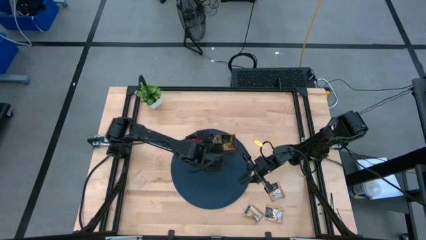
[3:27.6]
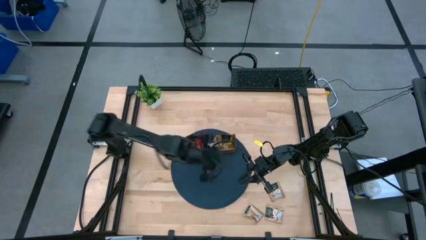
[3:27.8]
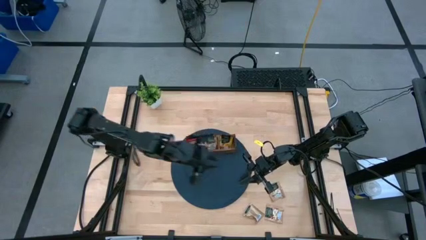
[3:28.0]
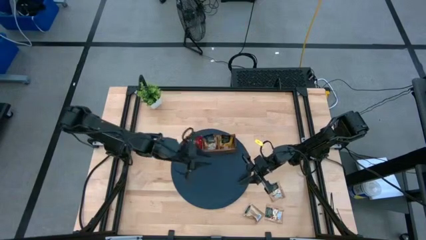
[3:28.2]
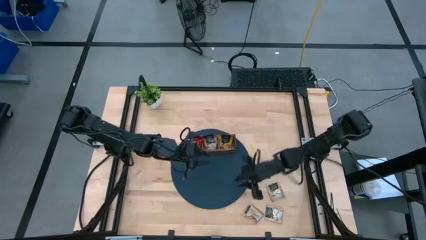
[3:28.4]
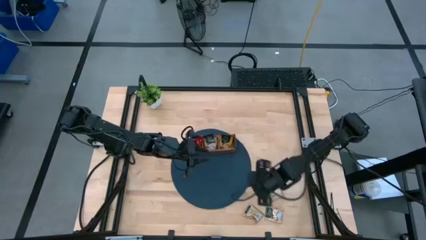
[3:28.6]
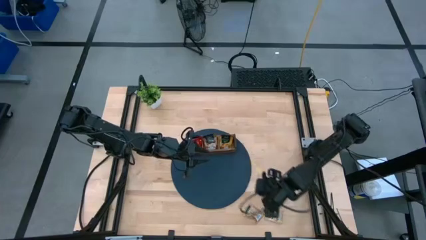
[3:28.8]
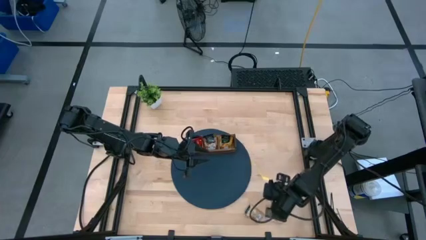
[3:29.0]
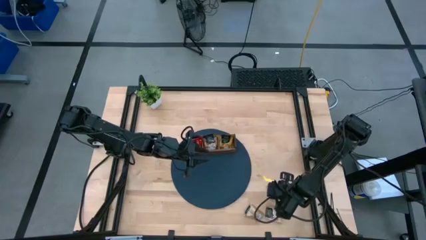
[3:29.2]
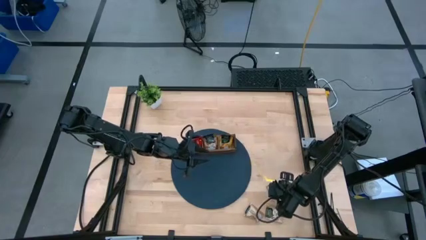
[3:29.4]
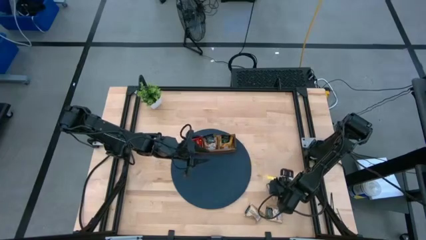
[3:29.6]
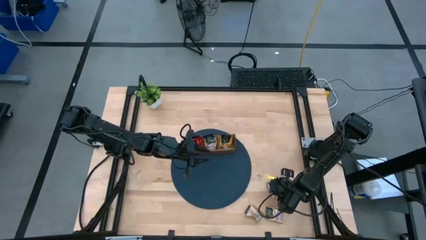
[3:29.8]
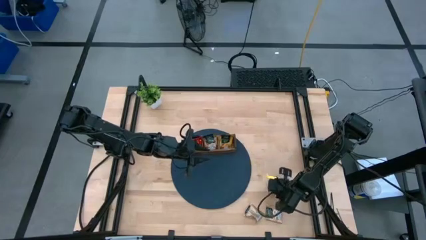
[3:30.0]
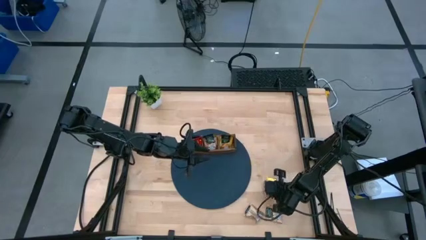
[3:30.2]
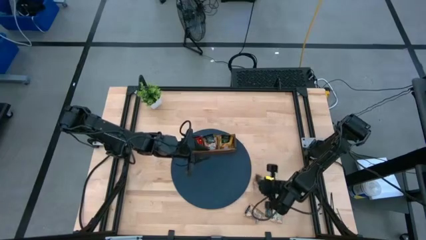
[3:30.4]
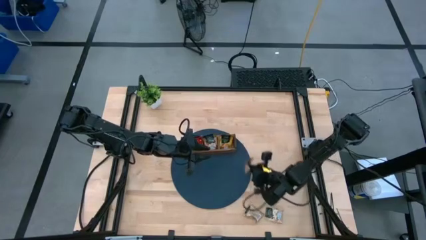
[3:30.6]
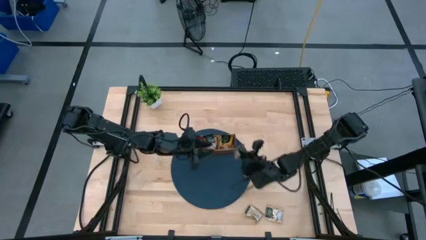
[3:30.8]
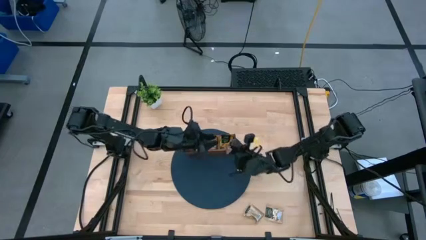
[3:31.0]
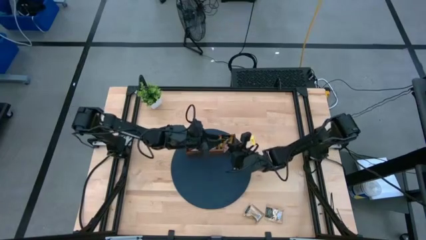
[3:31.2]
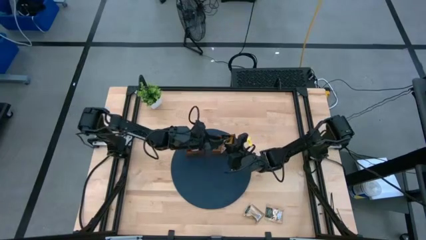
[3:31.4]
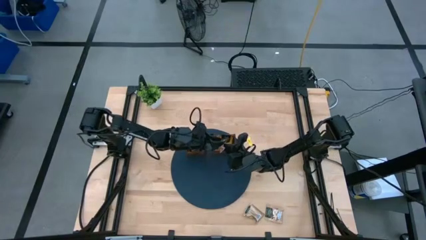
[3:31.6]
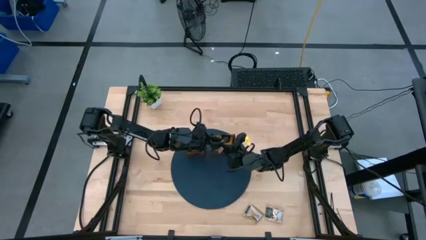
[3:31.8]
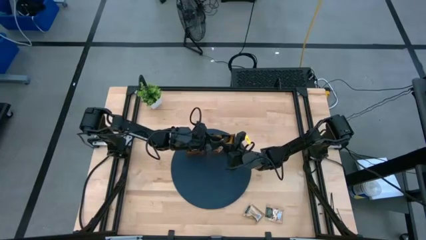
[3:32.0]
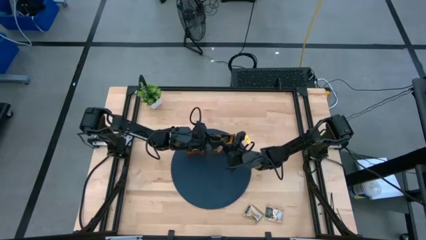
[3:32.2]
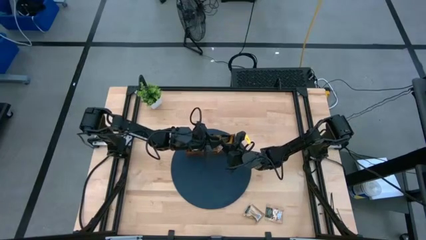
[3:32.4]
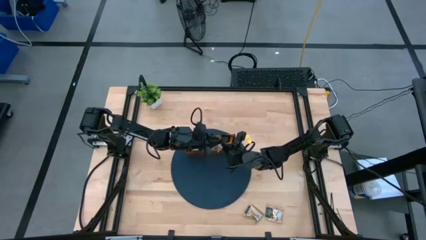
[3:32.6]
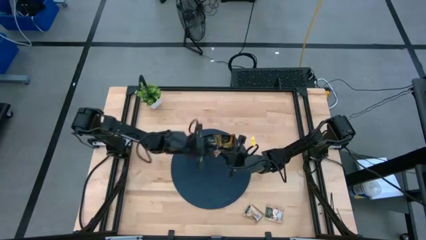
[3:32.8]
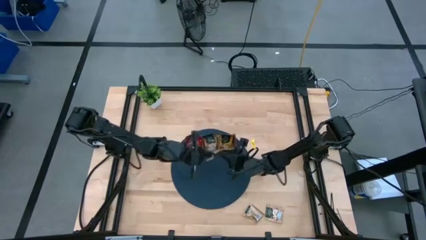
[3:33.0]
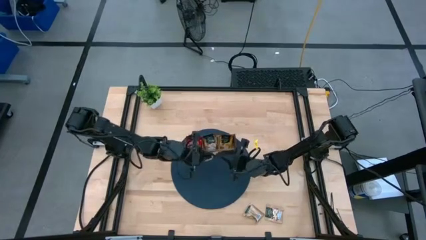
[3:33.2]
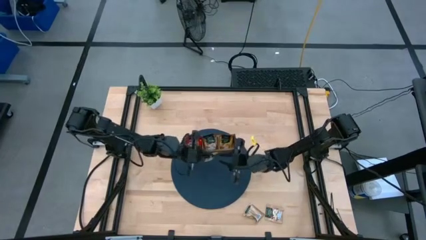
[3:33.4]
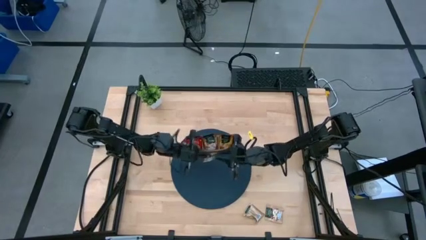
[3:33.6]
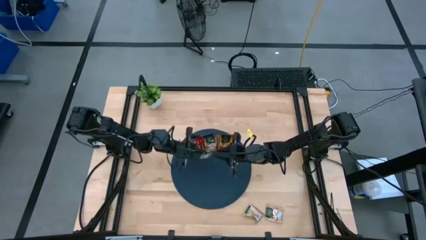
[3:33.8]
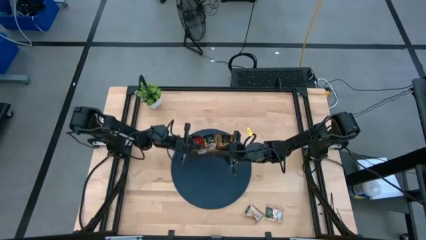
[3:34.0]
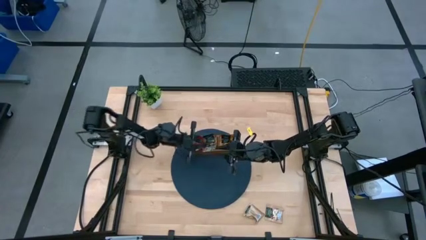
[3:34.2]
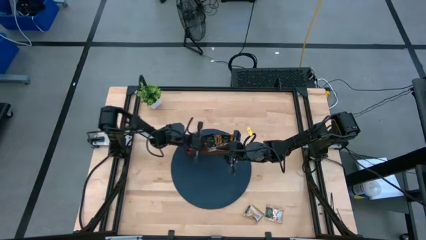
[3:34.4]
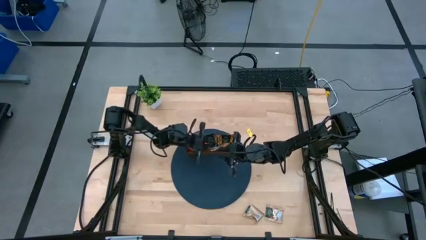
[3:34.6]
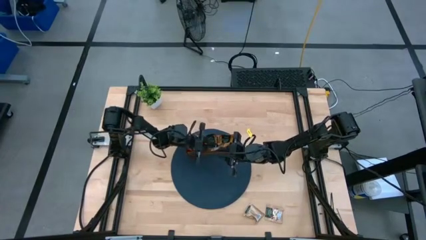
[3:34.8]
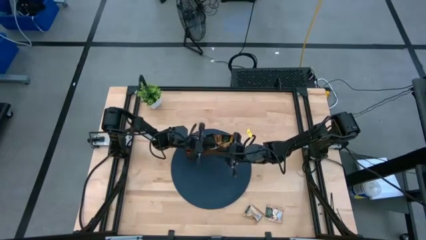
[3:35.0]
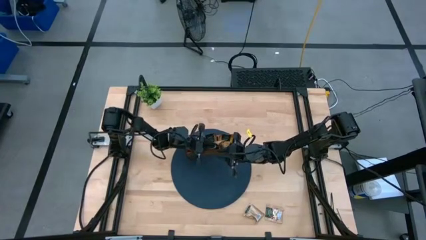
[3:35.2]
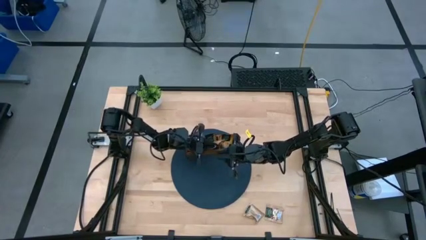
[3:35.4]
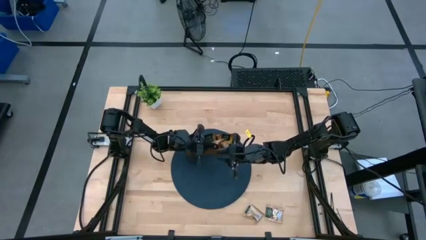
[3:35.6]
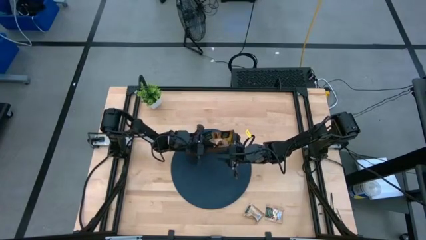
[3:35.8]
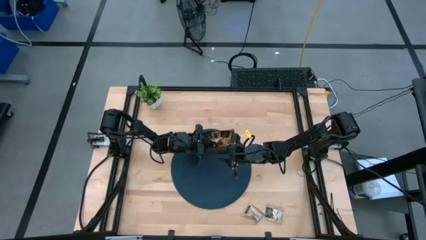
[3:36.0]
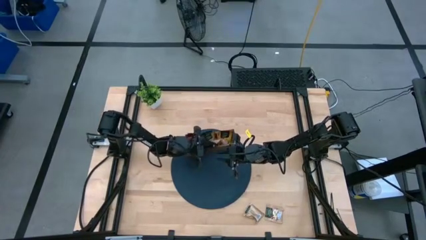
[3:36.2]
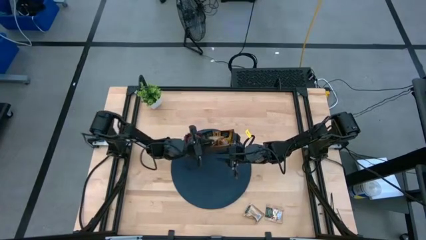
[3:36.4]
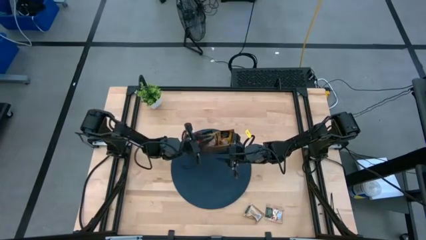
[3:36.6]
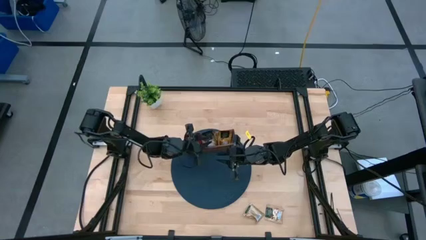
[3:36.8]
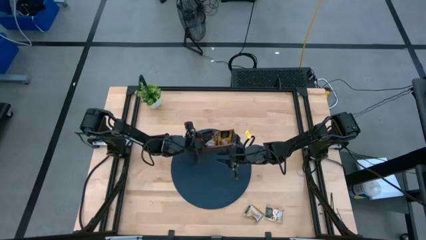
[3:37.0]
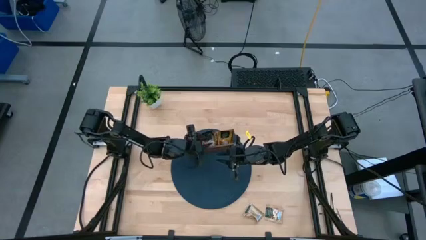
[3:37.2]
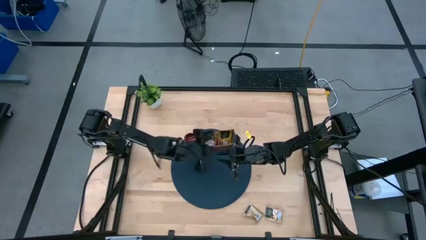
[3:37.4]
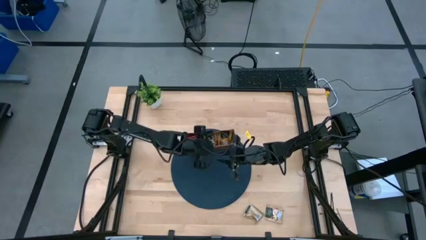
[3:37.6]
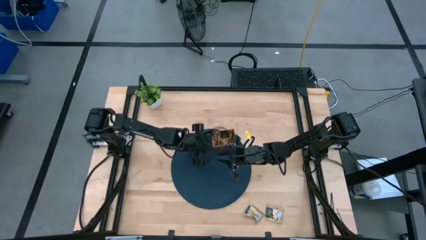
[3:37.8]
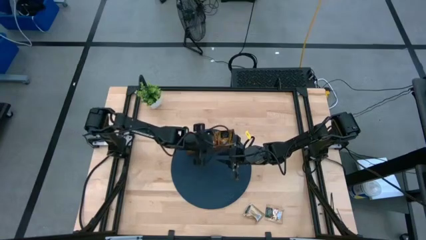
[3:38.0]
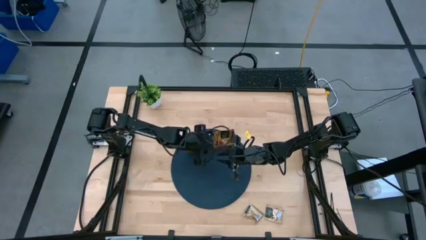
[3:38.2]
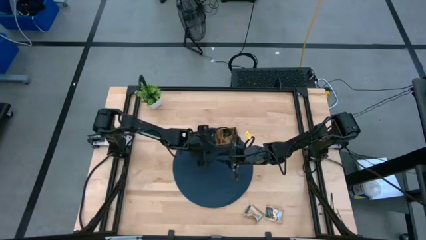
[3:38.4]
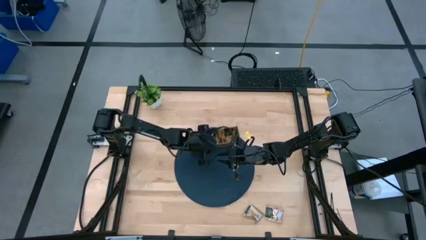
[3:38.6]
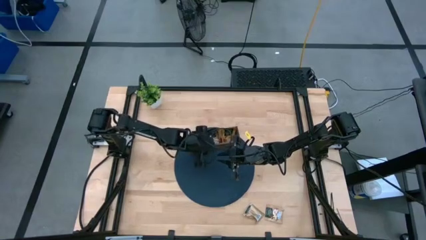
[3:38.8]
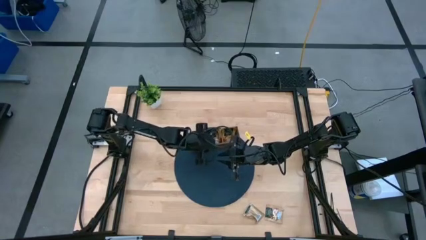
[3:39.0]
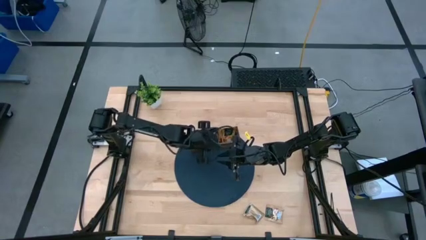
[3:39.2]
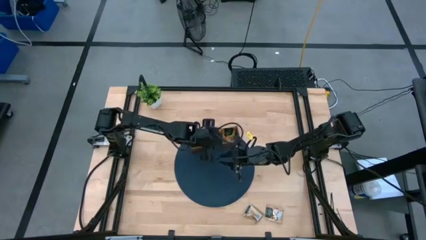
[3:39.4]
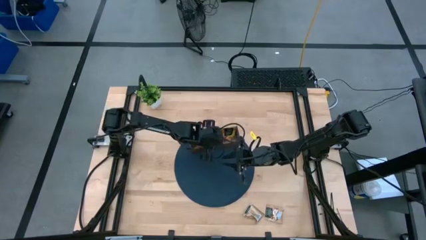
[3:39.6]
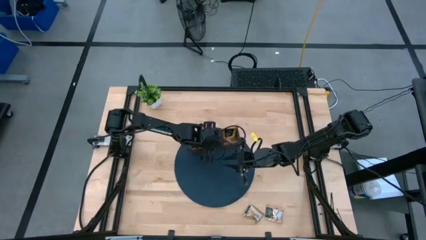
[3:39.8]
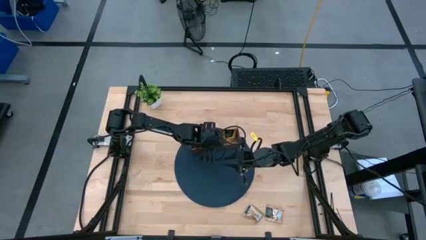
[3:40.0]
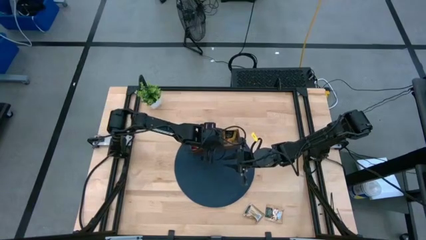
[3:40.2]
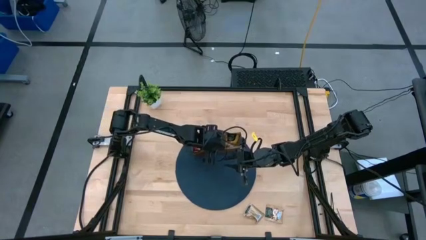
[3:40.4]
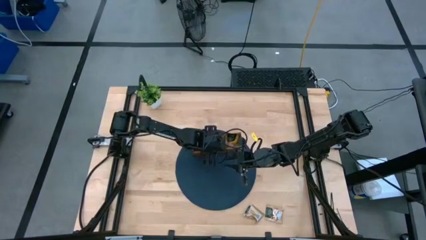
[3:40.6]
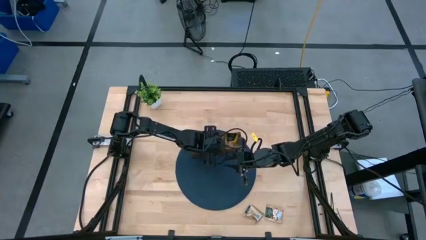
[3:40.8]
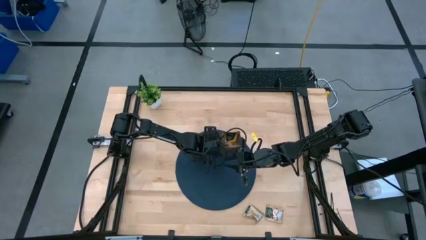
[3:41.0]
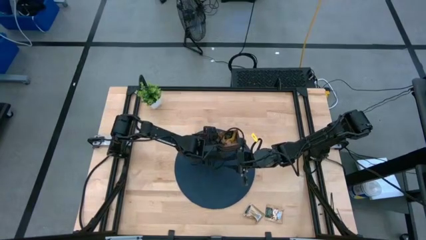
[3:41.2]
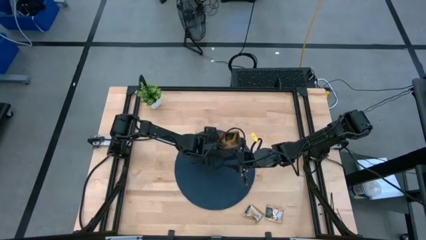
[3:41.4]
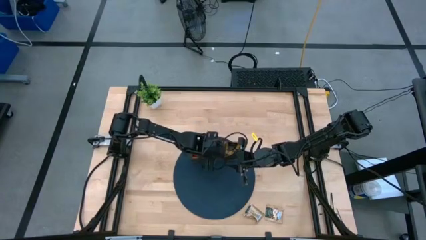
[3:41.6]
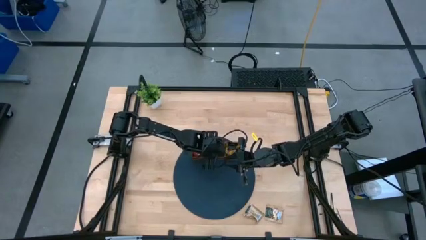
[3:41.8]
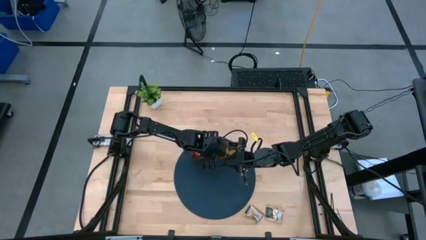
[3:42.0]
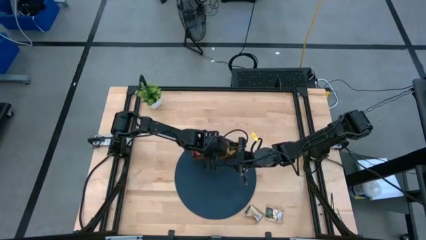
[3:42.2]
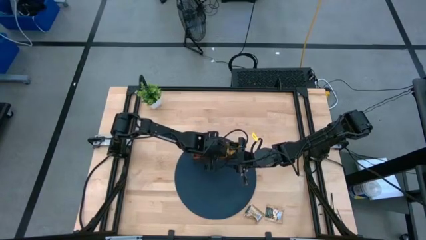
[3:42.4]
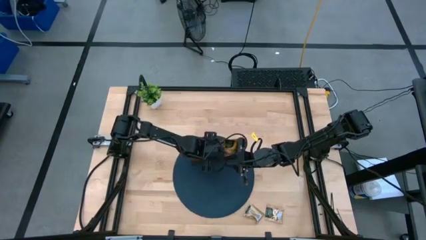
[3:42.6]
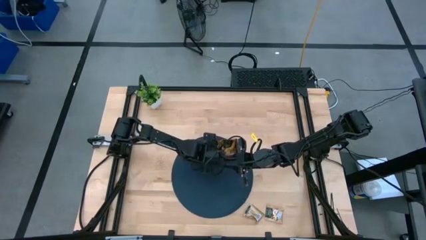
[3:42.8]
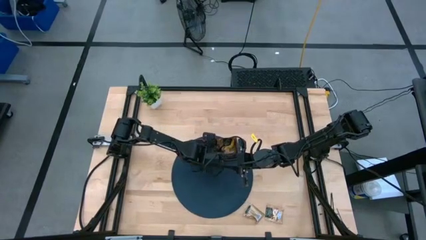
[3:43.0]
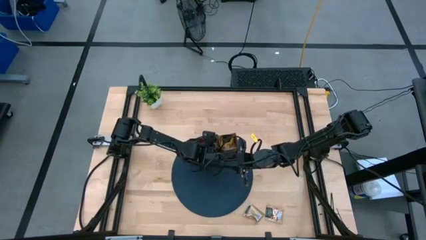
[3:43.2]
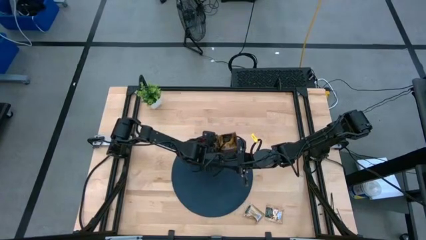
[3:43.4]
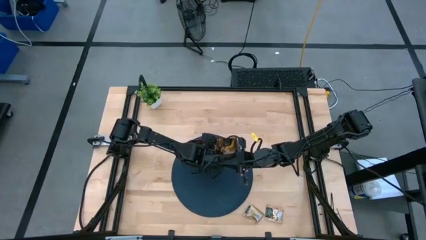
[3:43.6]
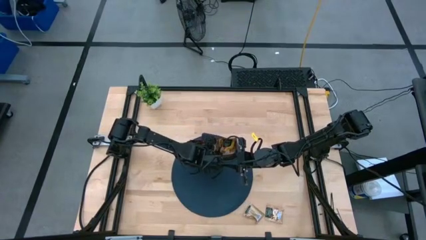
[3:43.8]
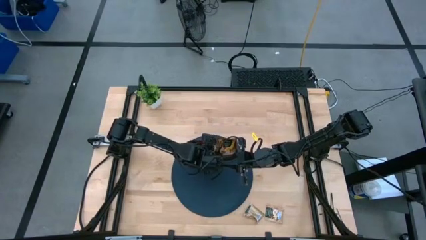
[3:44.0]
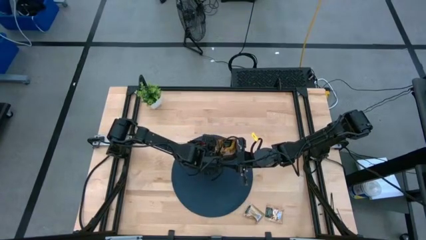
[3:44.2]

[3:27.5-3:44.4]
Task: Pick & Place Tea
Put the top right brown tea bag into the middle section of the wooden organizer
